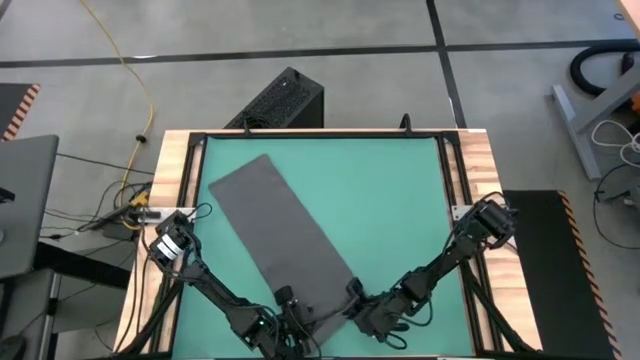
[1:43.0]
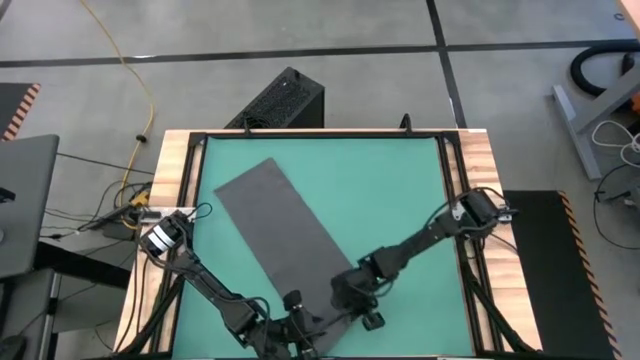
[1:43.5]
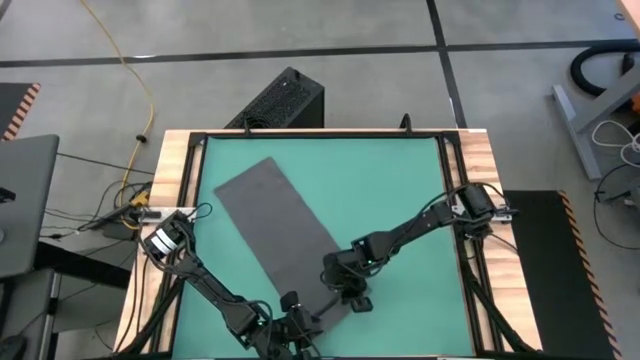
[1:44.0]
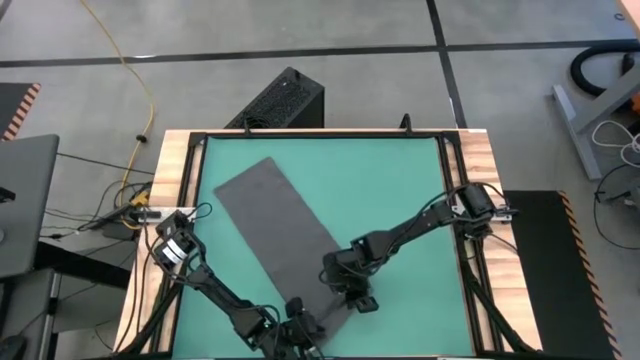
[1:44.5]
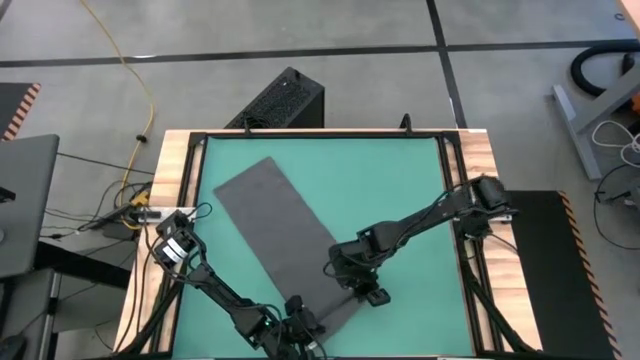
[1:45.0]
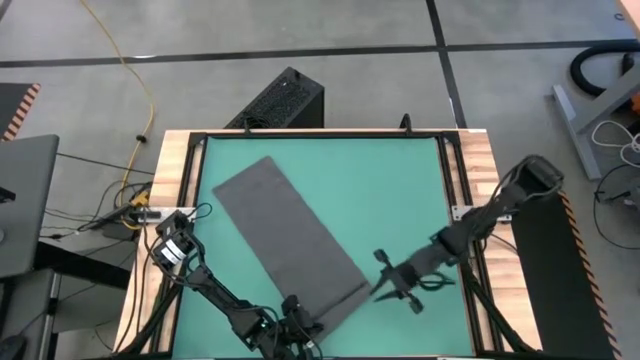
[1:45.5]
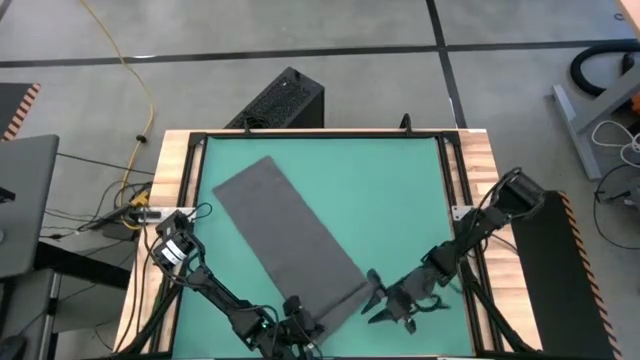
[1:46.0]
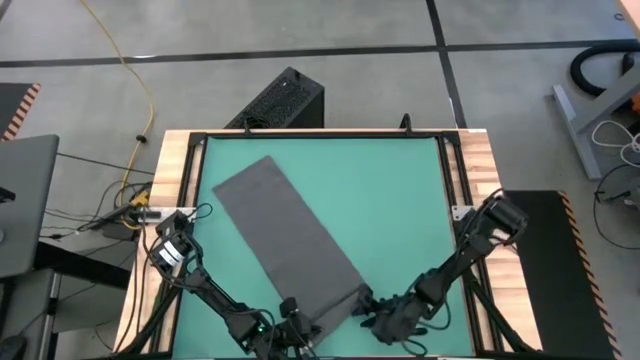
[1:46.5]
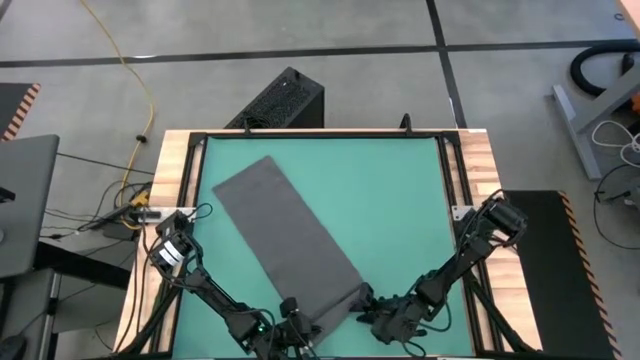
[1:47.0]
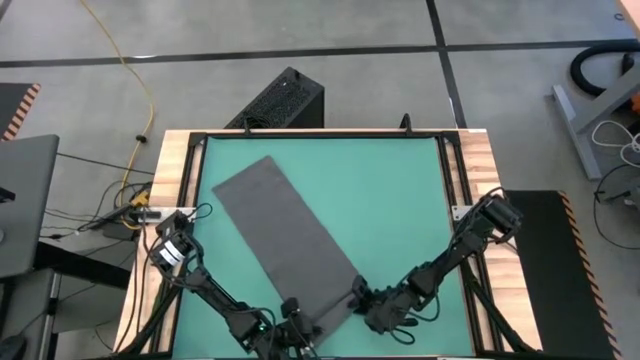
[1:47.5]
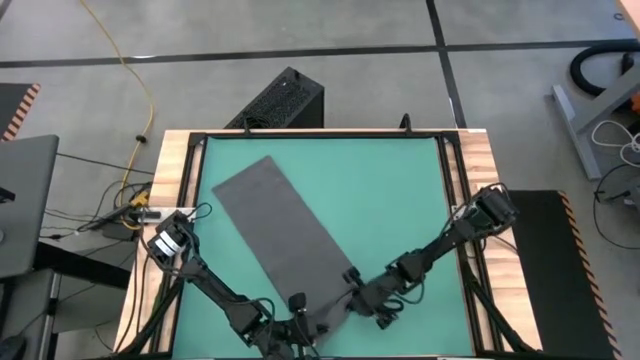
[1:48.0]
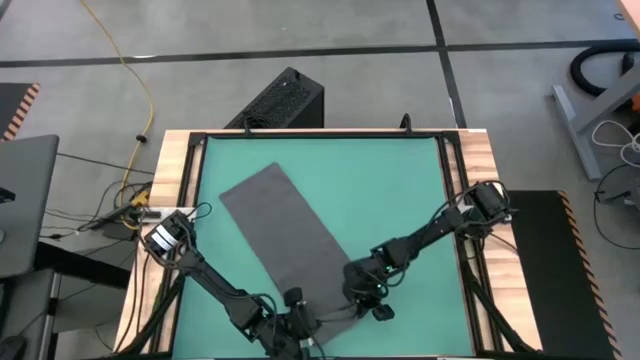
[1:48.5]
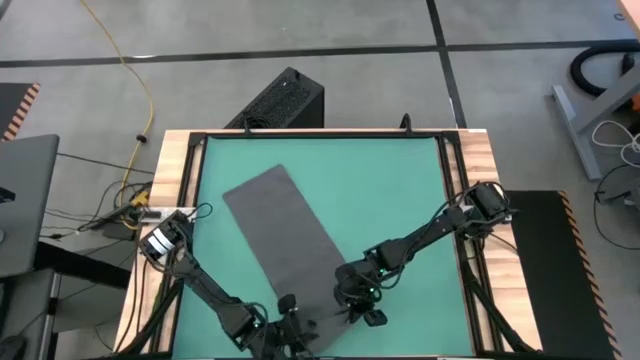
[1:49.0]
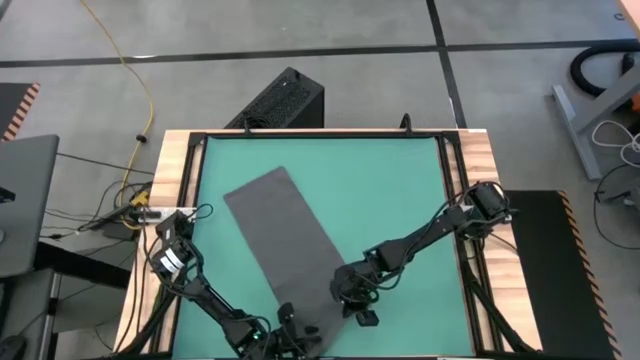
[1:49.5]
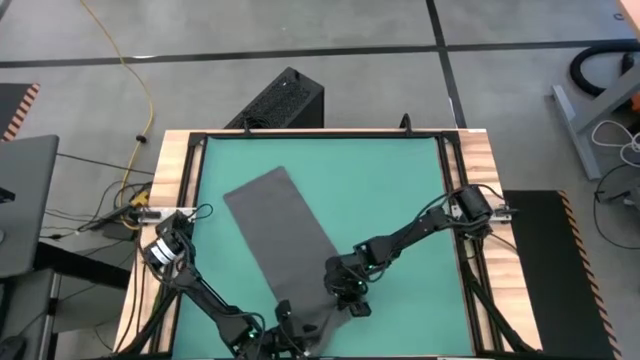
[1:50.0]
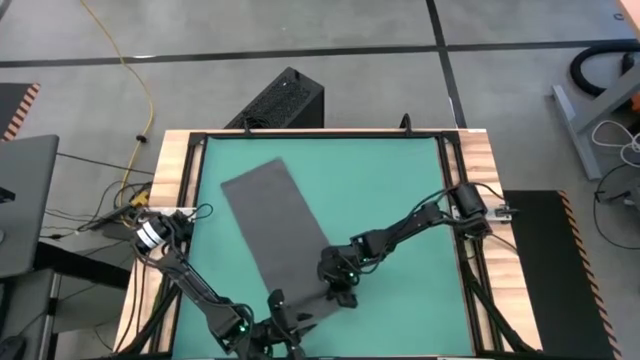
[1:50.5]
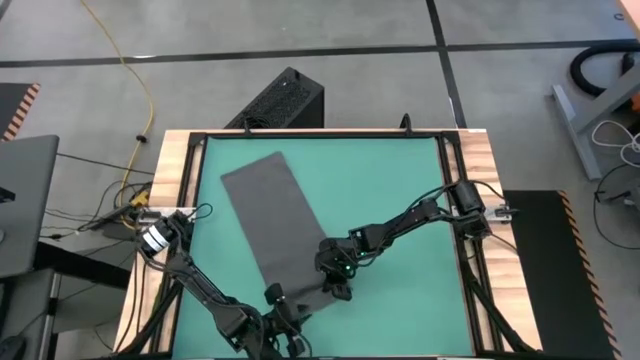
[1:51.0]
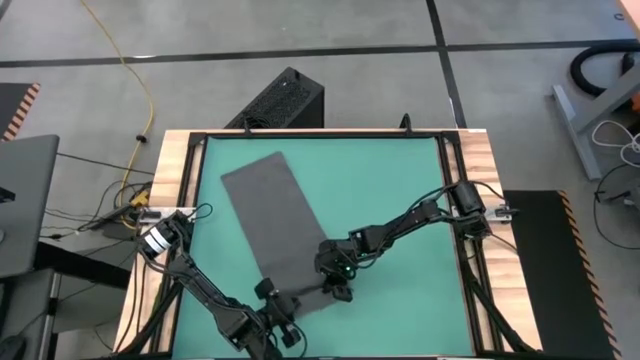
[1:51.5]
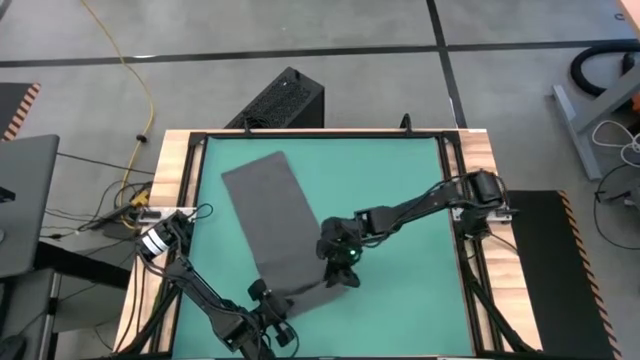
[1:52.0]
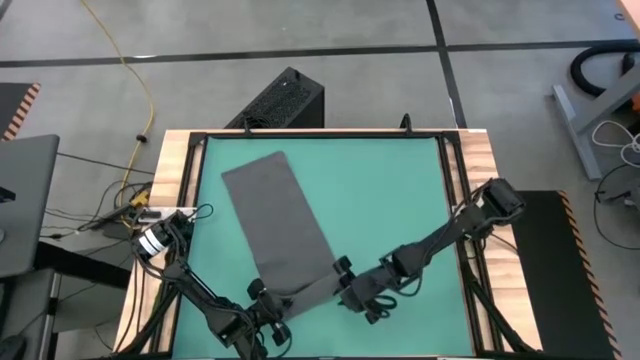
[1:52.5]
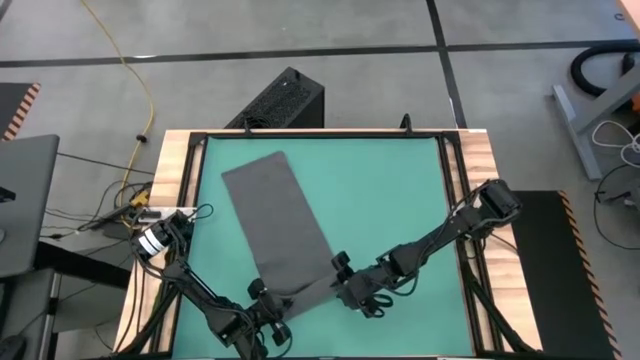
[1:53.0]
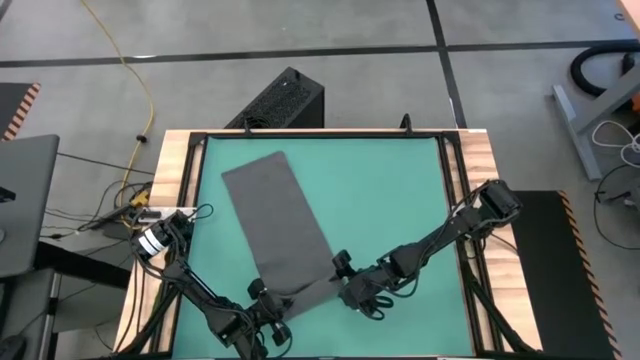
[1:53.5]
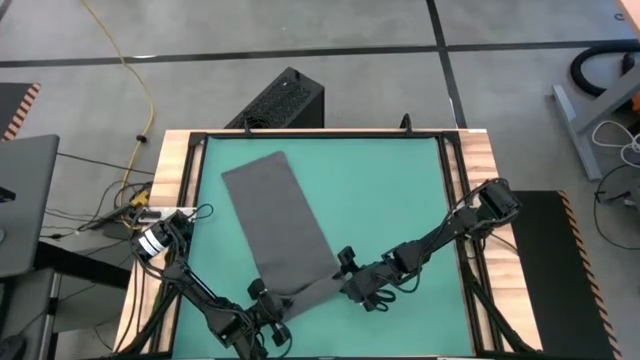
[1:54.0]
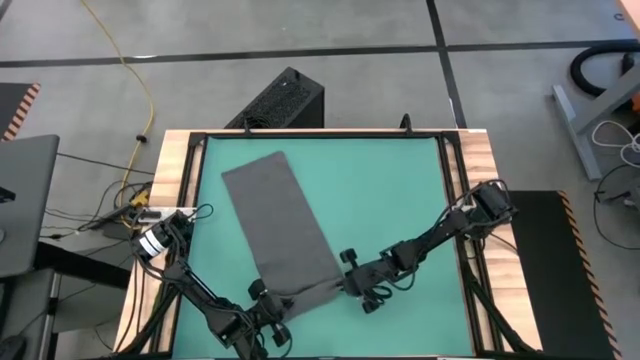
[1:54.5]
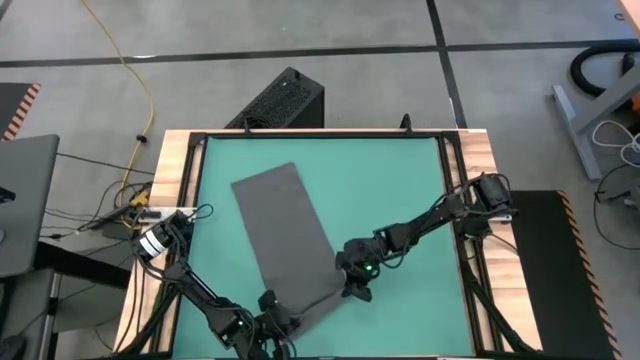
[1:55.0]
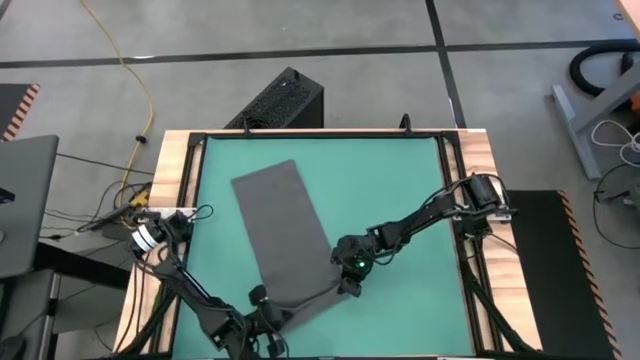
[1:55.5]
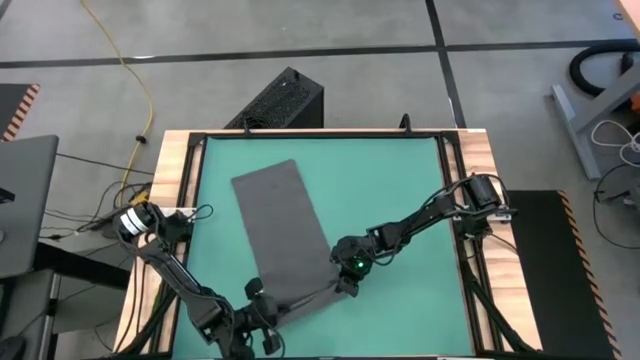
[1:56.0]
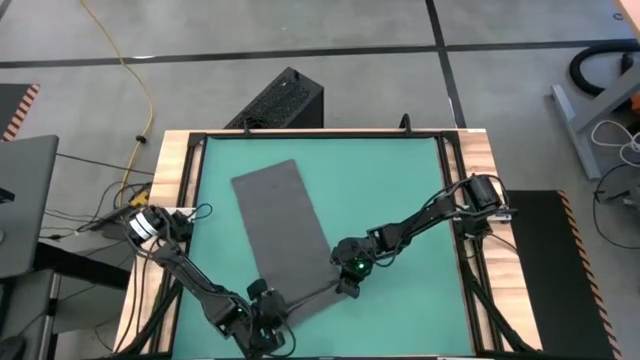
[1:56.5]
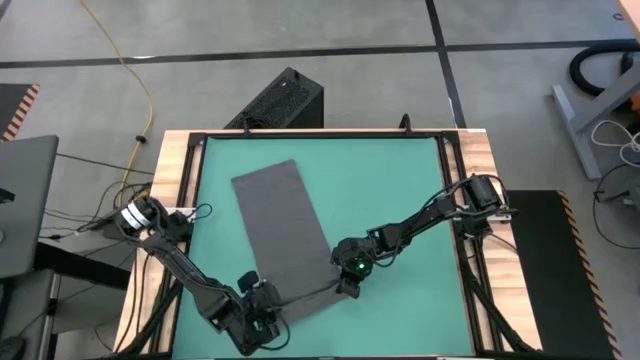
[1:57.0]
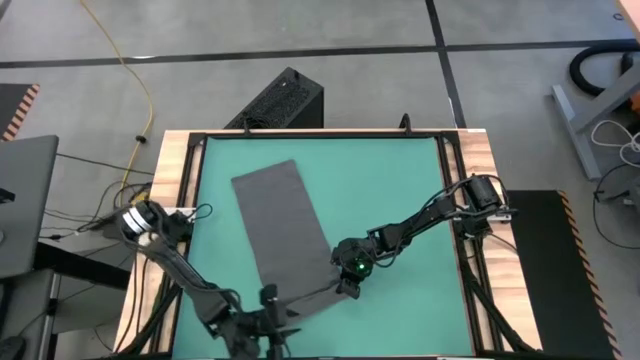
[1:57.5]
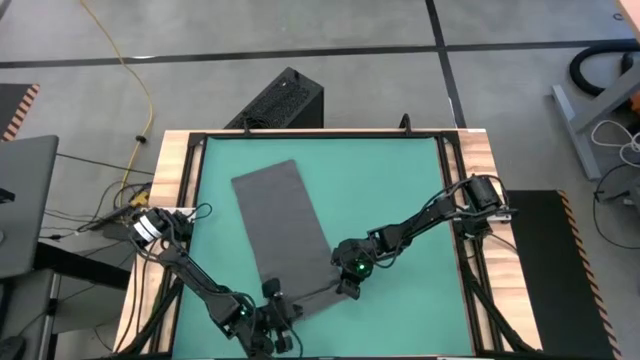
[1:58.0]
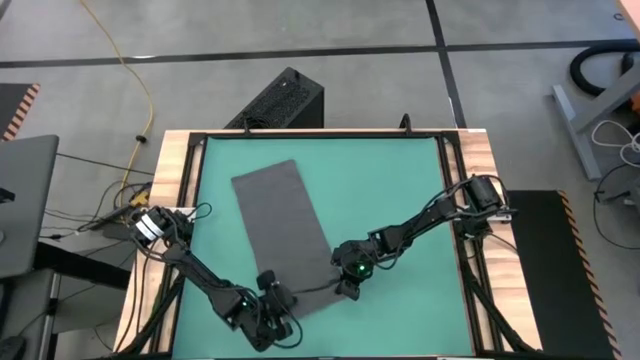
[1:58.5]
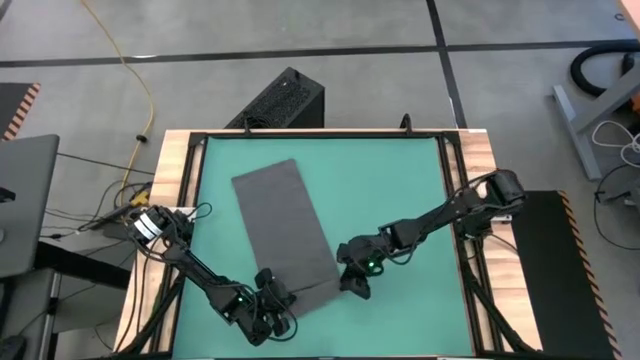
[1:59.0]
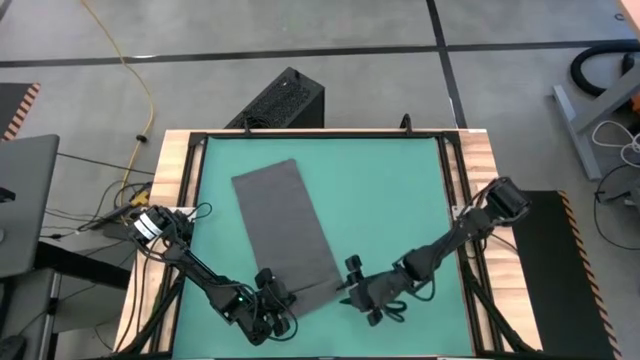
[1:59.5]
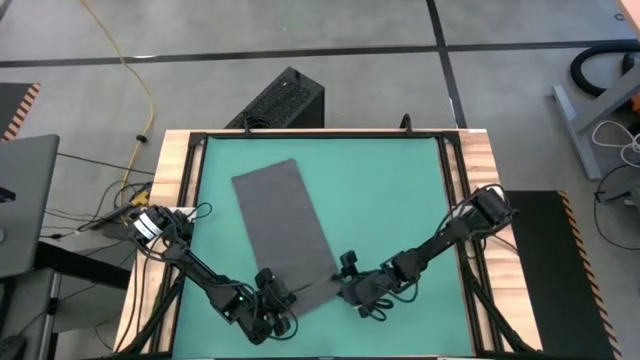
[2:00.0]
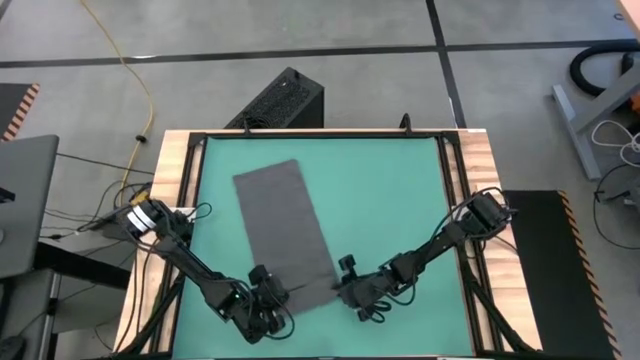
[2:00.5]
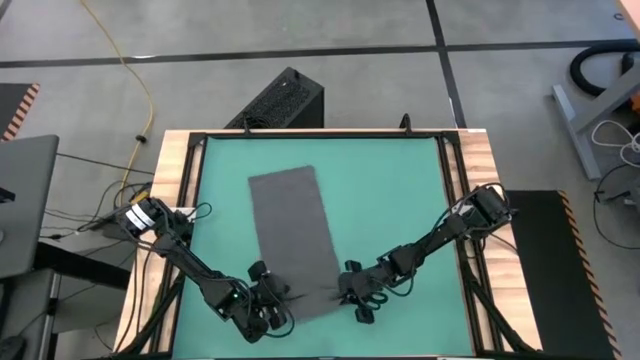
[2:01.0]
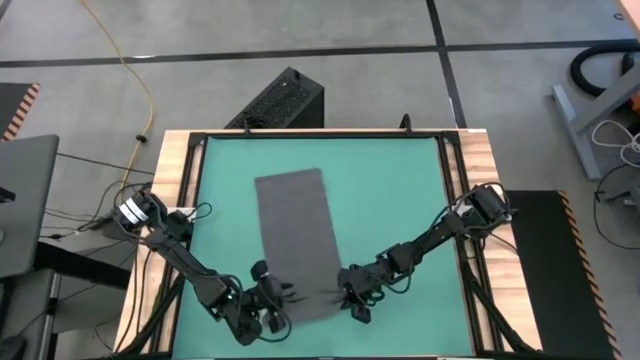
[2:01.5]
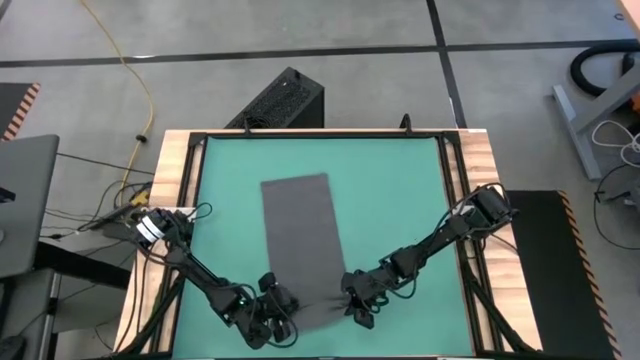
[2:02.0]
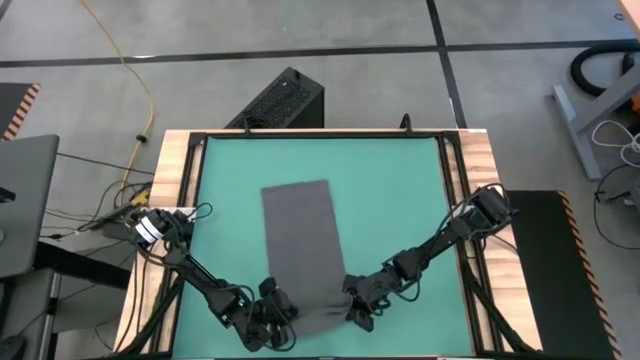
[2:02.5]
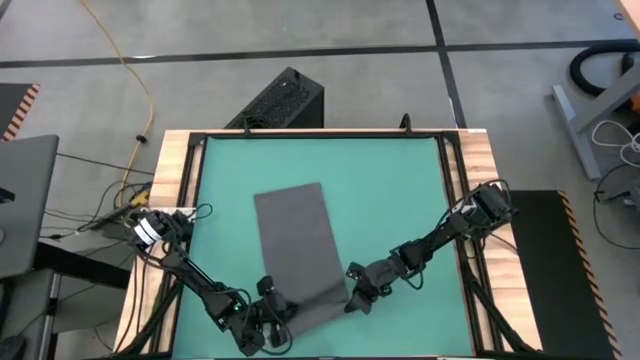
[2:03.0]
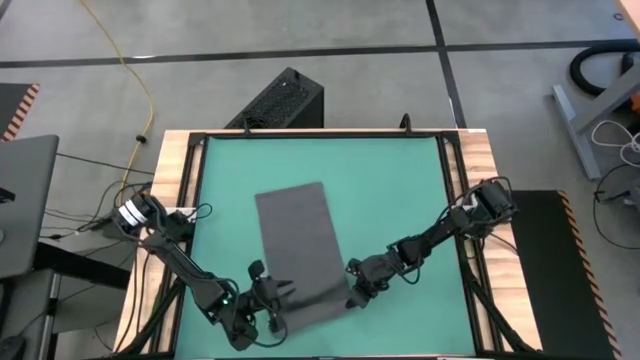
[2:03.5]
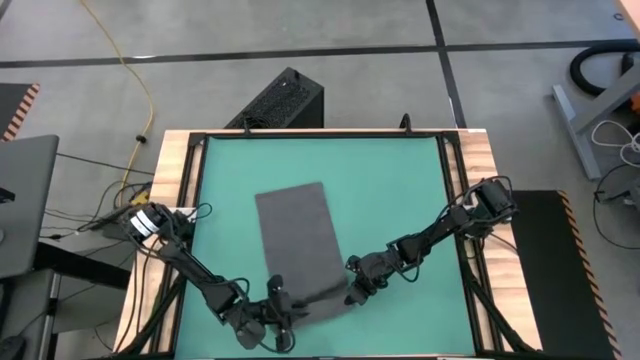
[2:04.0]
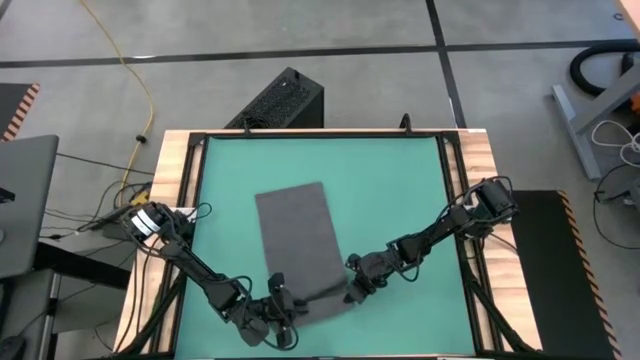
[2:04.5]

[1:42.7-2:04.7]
Task: Roll towel
Roll the gray towel
